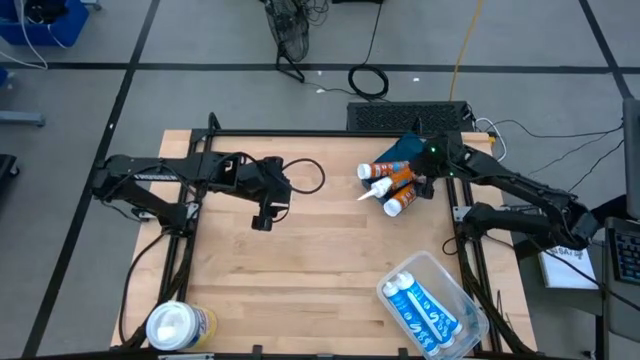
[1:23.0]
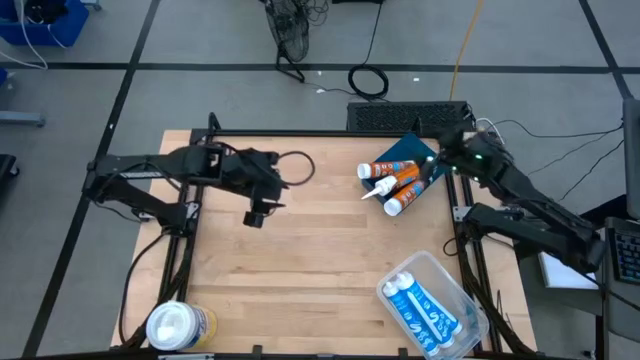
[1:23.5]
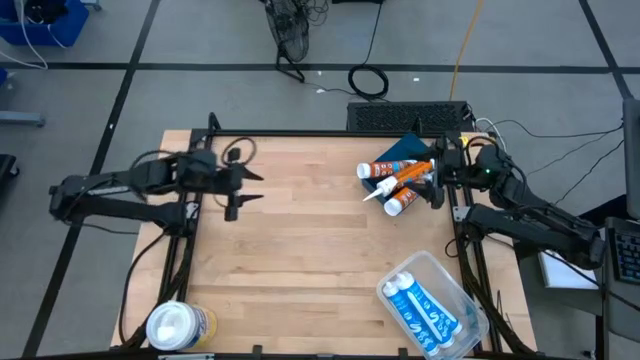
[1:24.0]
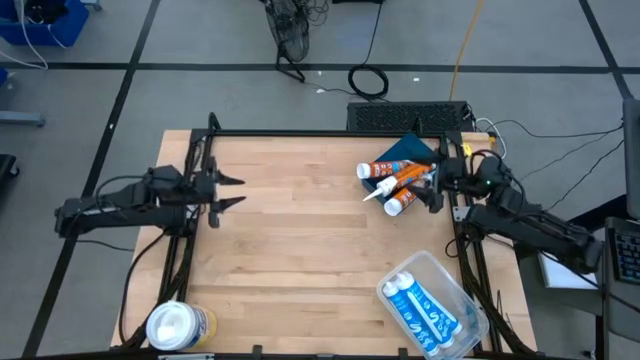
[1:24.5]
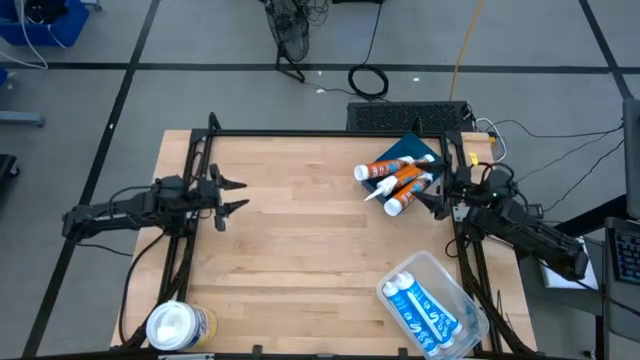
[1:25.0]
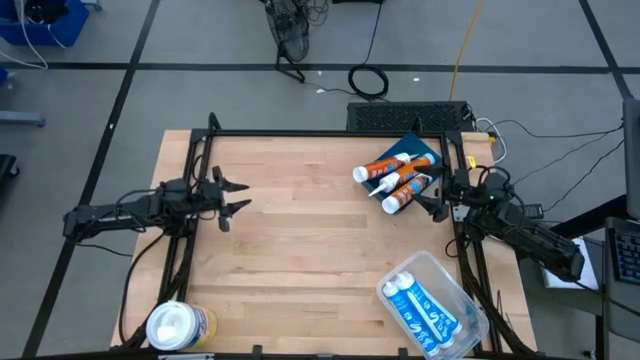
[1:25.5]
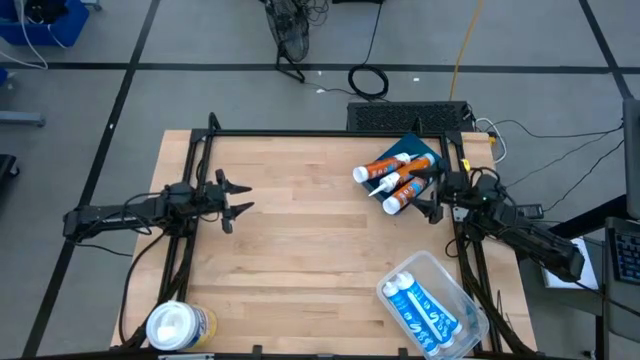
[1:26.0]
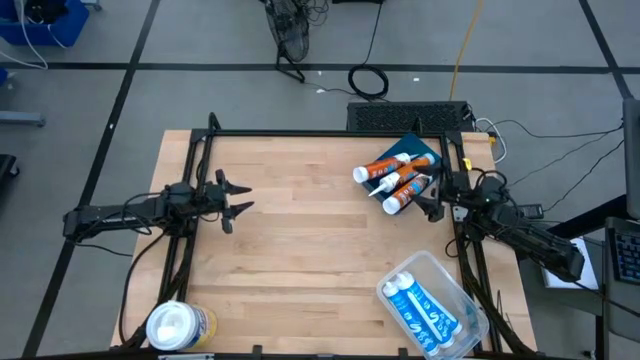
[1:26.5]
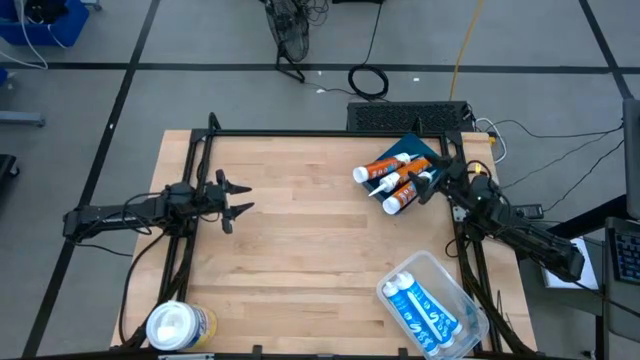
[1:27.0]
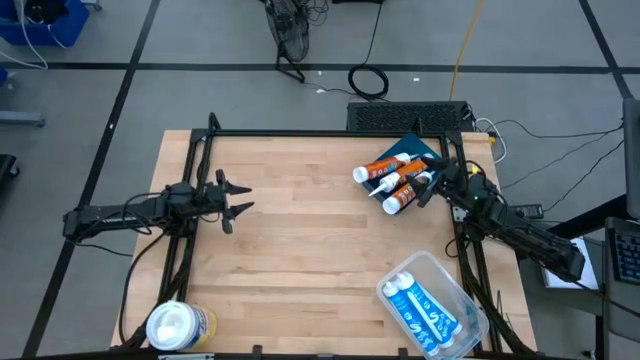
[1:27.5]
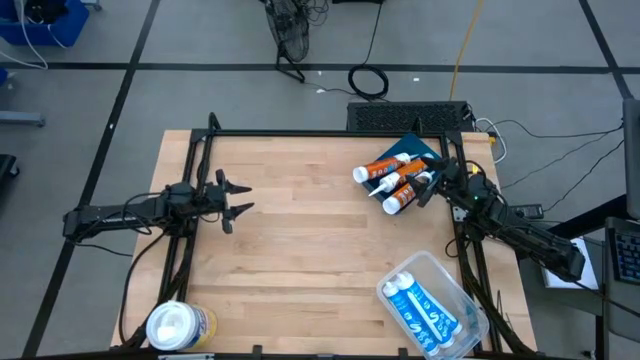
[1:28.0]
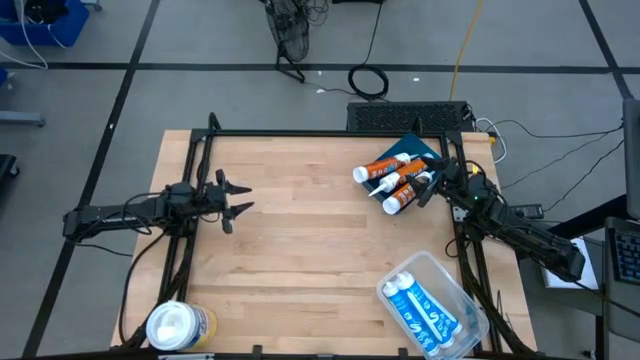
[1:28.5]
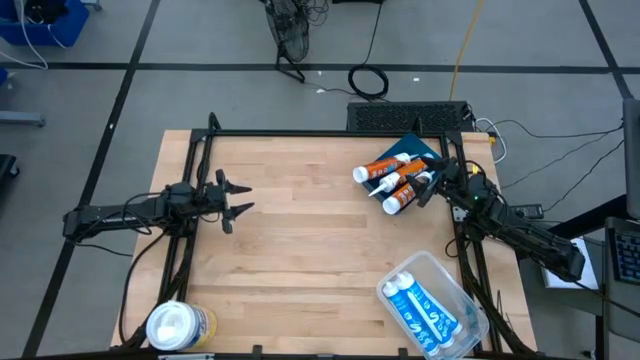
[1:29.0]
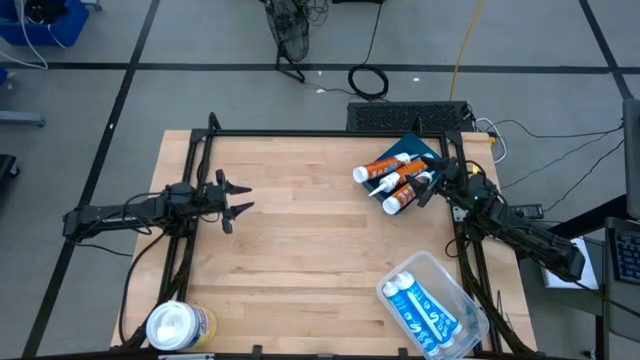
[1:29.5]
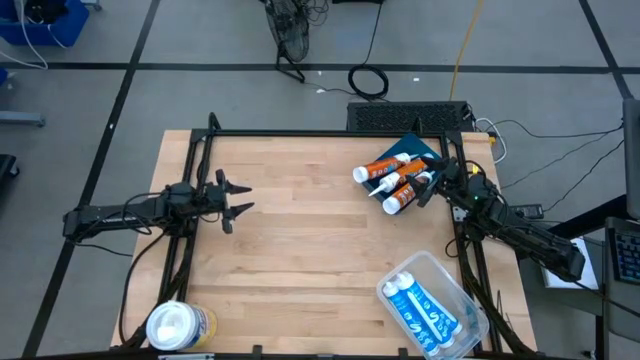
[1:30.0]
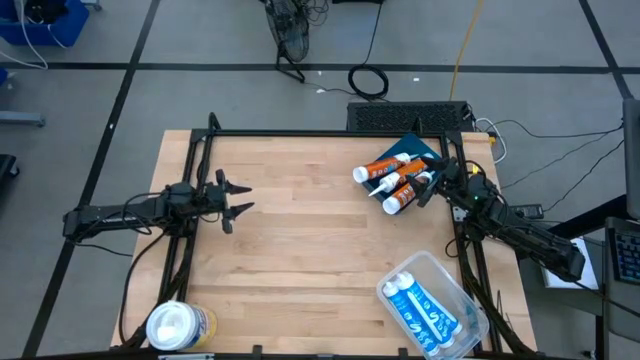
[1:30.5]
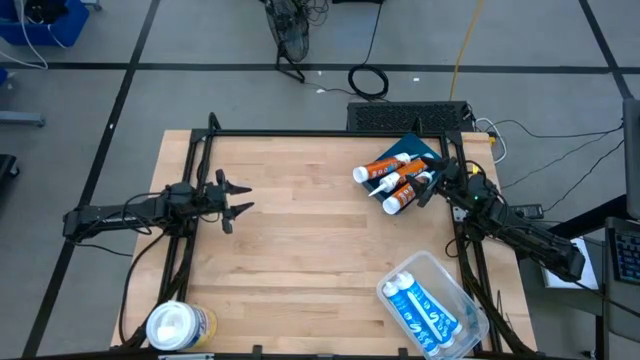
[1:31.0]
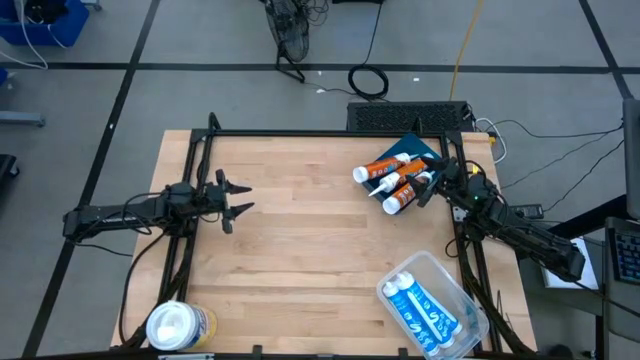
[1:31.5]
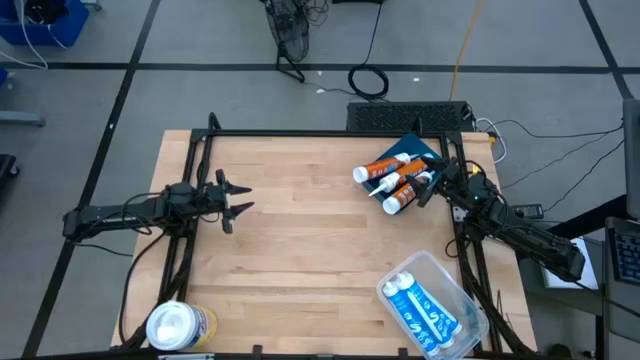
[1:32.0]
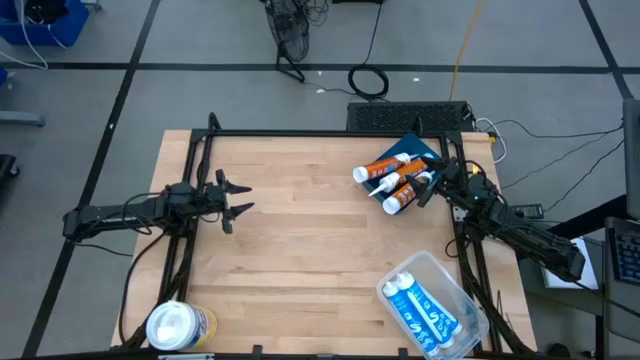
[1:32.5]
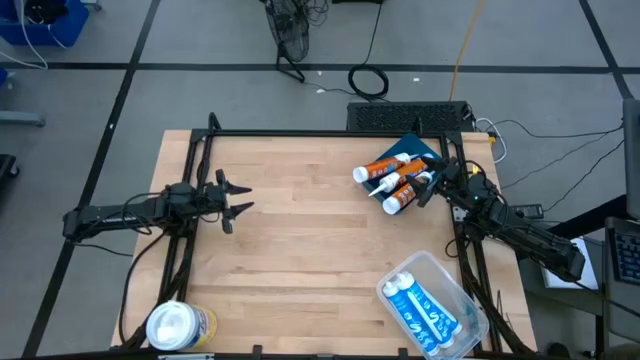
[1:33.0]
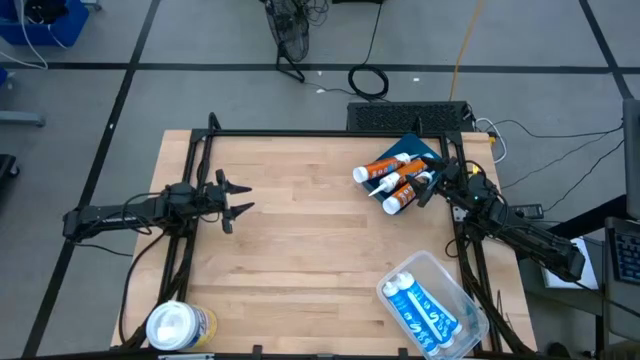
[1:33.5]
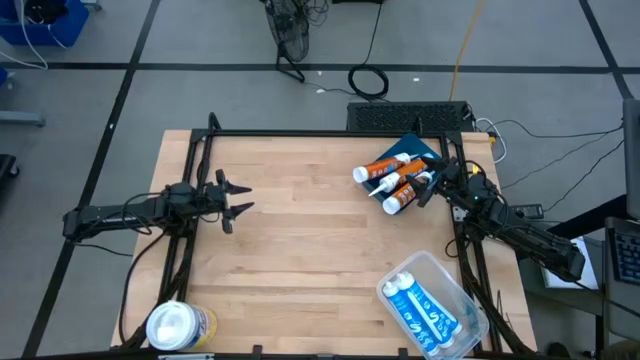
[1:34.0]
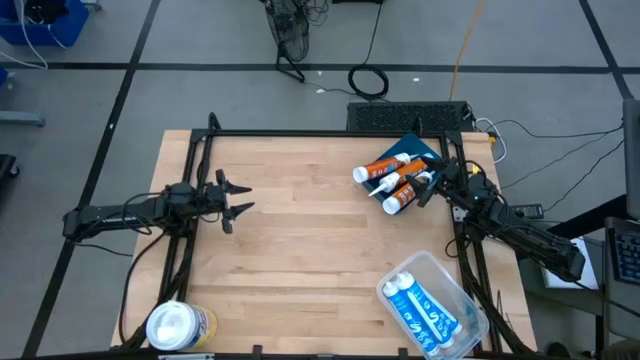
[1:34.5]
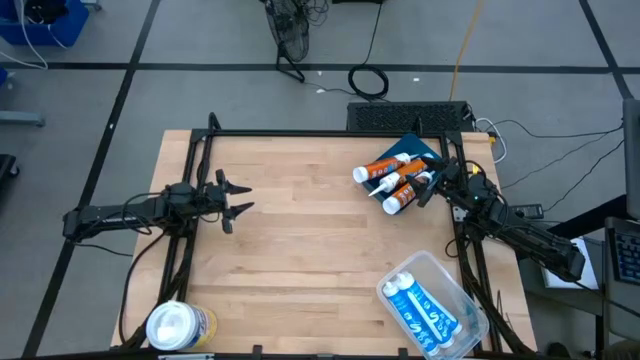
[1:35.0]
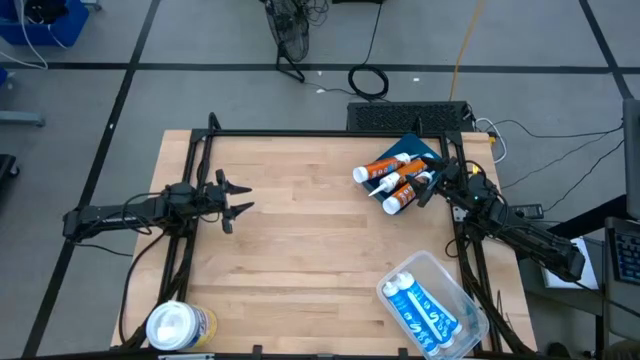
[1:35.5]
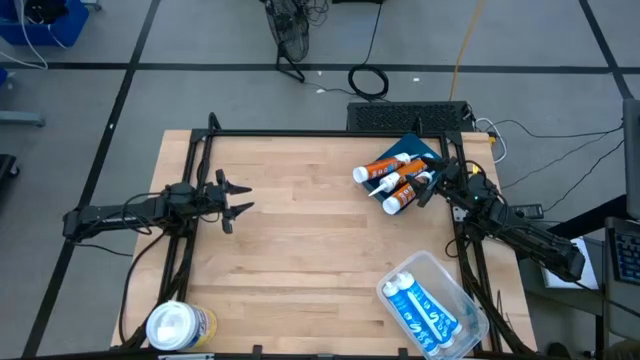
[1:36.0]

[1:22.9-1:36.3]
Task: Pick & place silicon tubes, Sealant and Lysol wipes
Return to Home Position

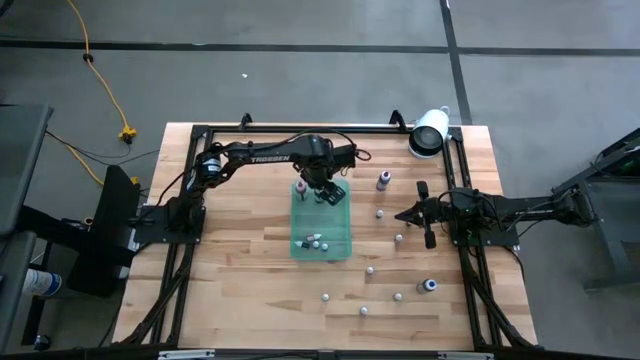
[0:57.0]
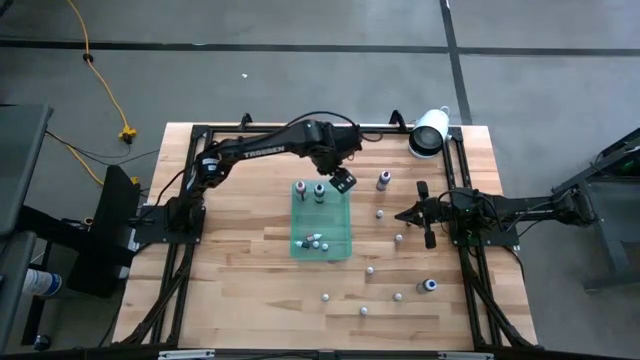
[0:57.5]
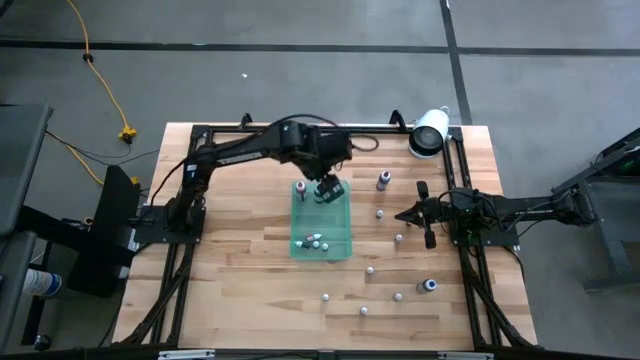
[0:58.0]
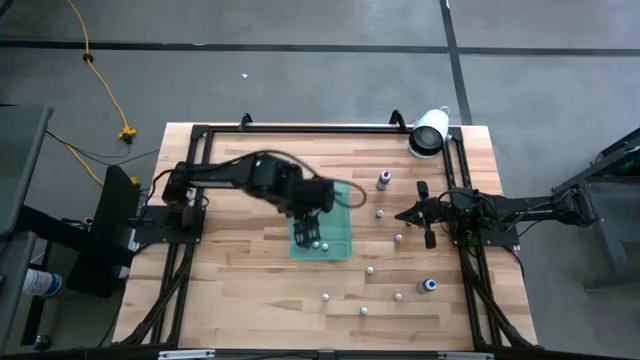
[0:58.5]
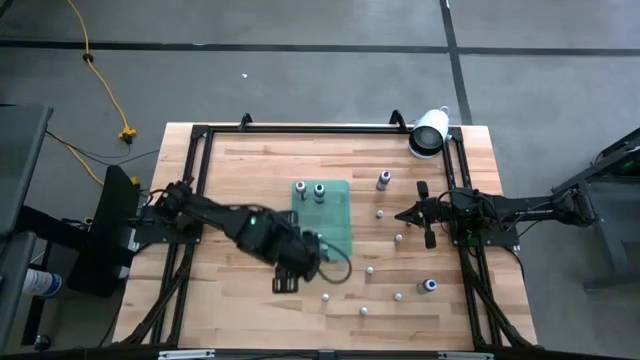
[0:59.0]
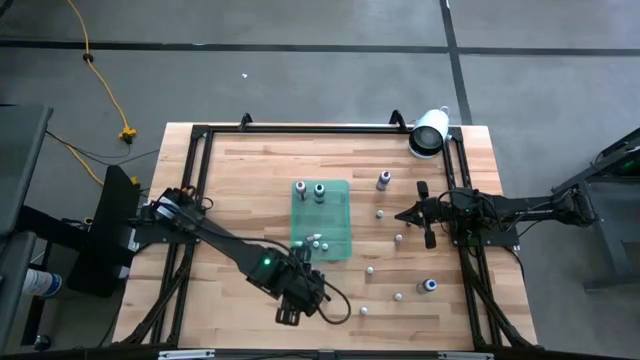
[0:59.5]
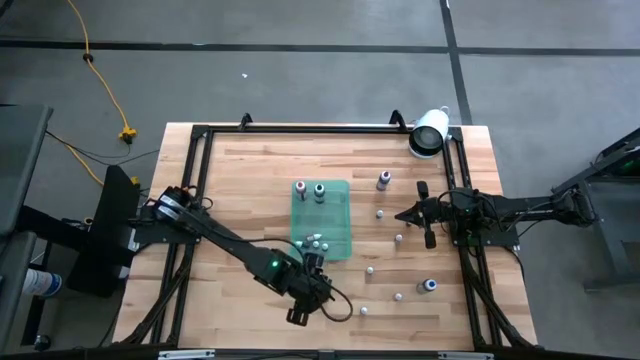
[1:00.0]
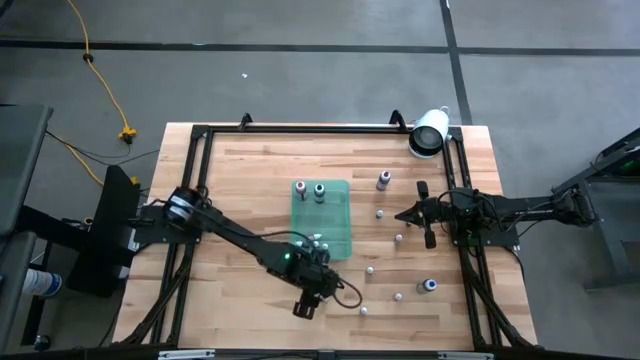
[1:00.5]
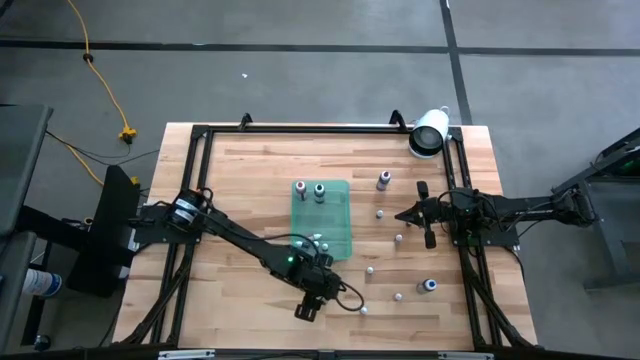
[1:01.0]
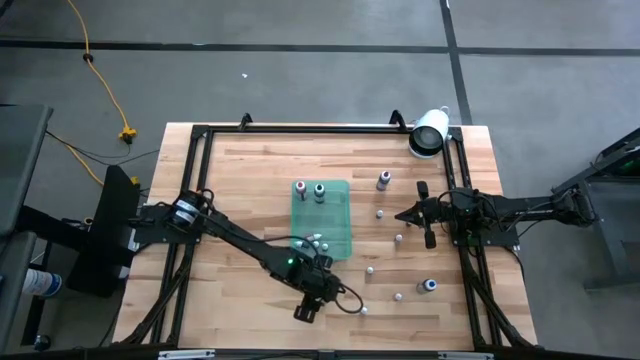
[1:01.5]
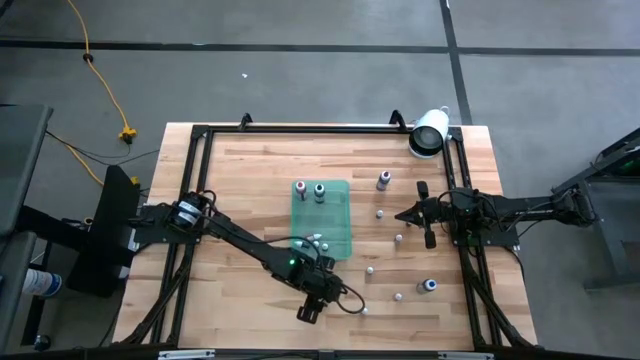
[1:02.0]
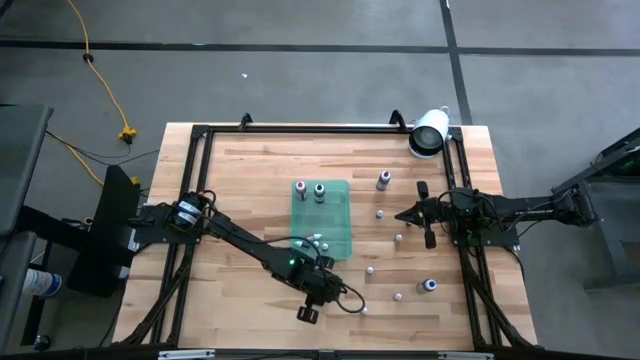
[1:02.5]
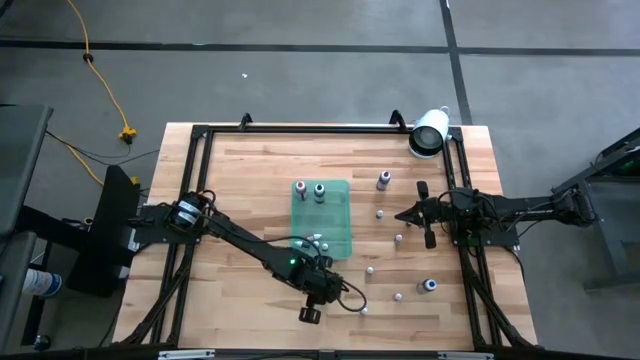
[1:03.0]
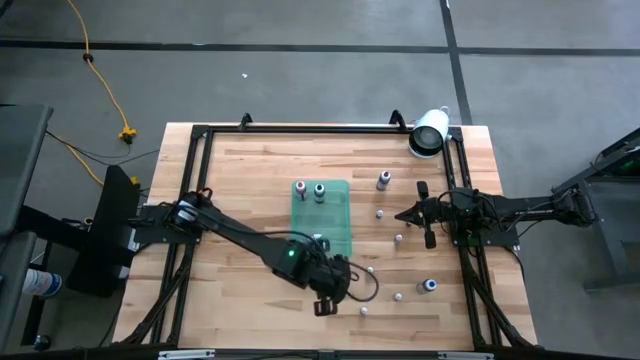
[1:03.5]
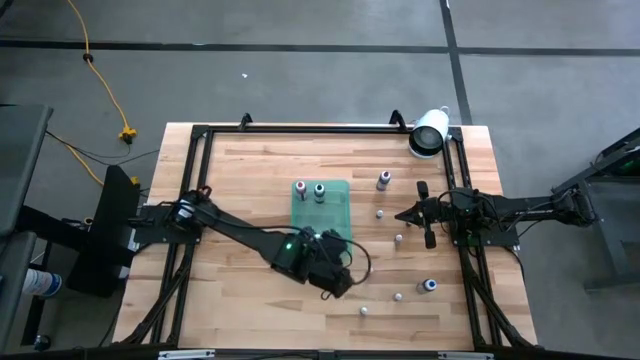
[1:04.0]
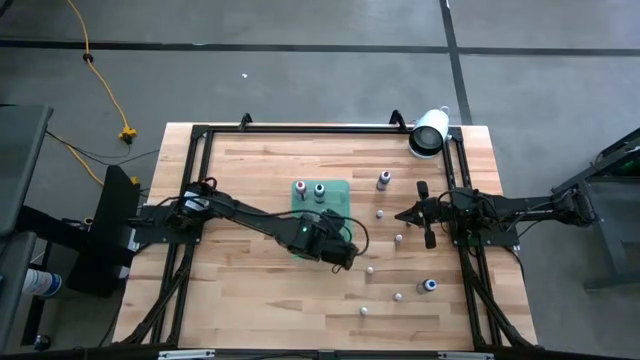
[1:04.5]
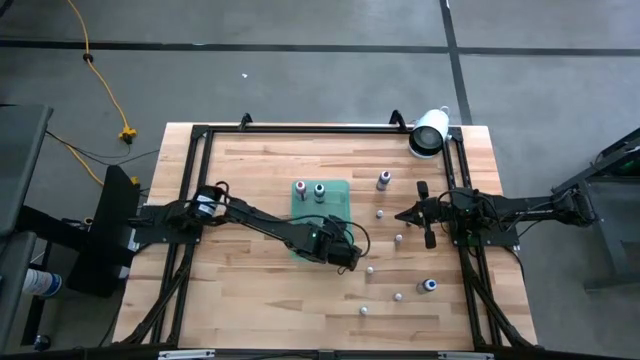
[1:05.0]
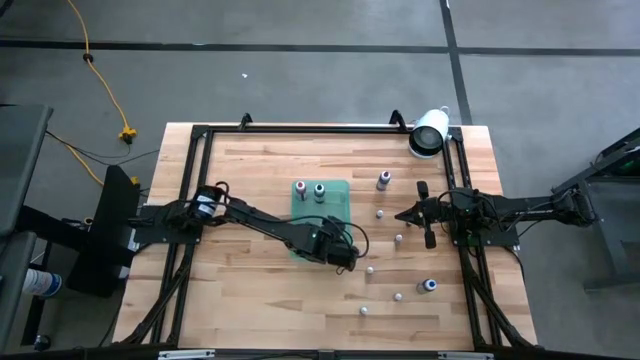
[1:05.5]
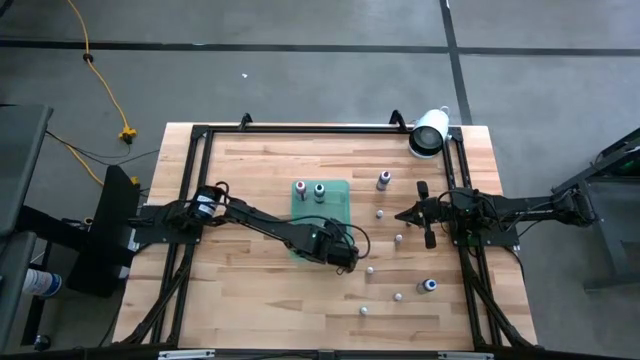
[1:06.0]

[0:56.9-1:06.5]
Task: Pick & Place food coloring
Put the small blue food coloring bottle into the green bin
